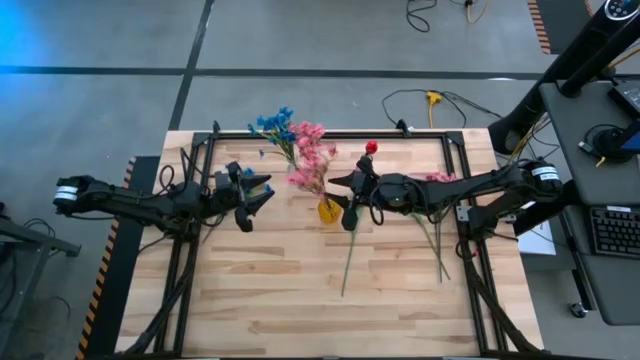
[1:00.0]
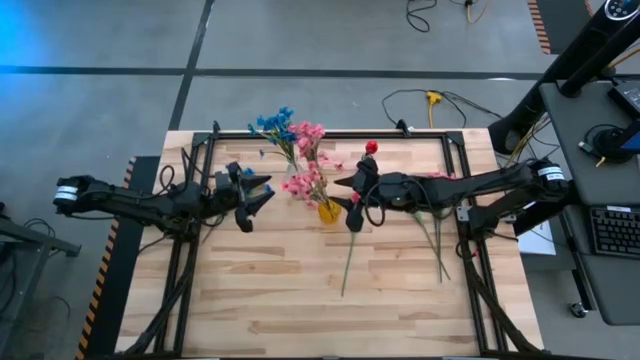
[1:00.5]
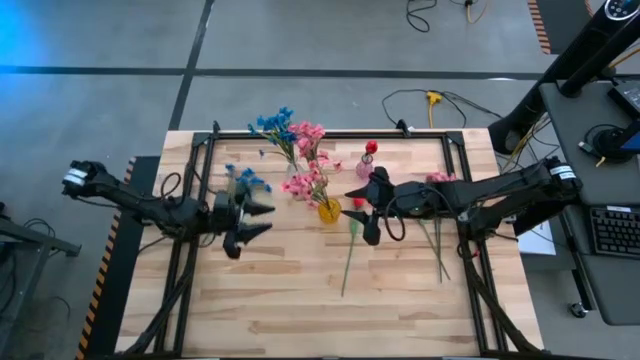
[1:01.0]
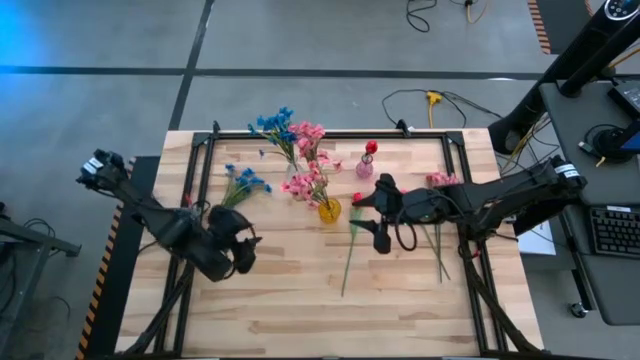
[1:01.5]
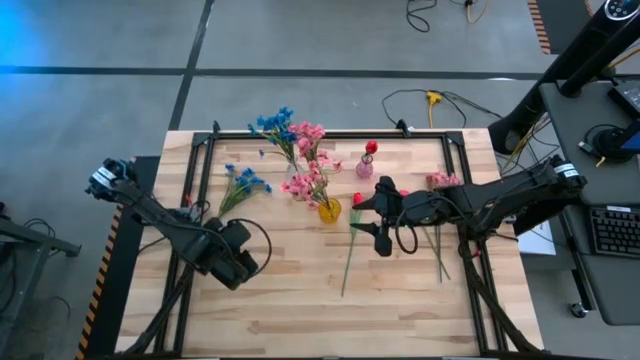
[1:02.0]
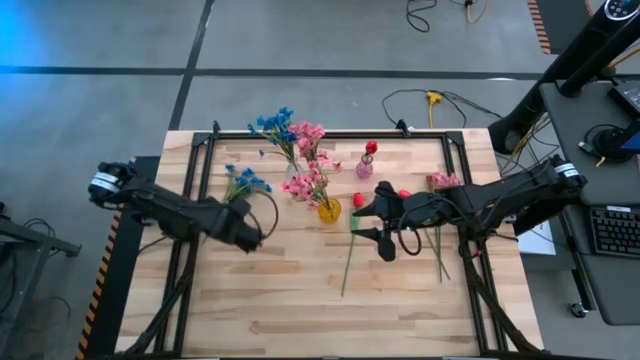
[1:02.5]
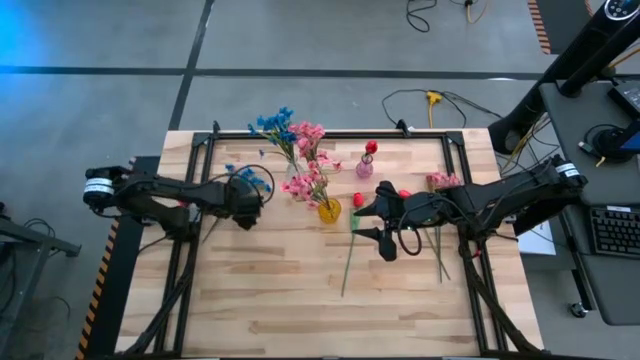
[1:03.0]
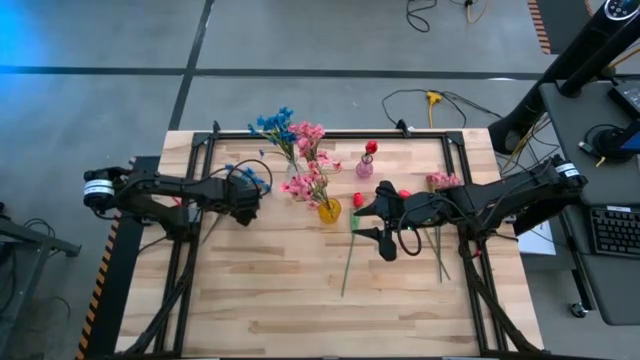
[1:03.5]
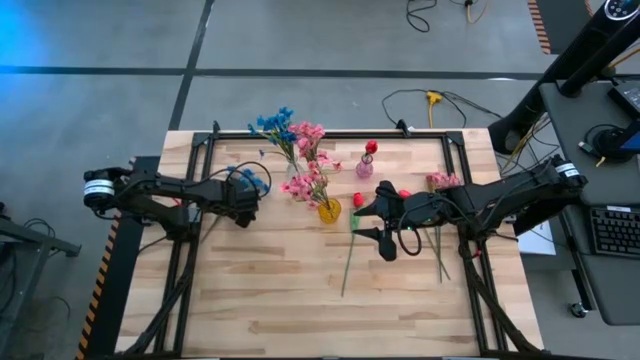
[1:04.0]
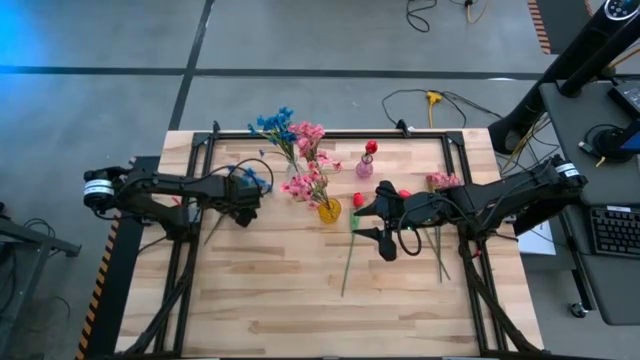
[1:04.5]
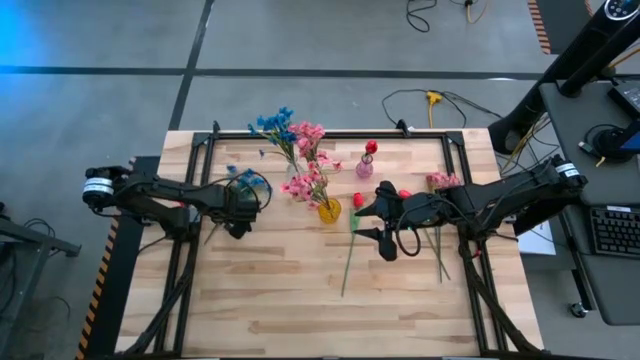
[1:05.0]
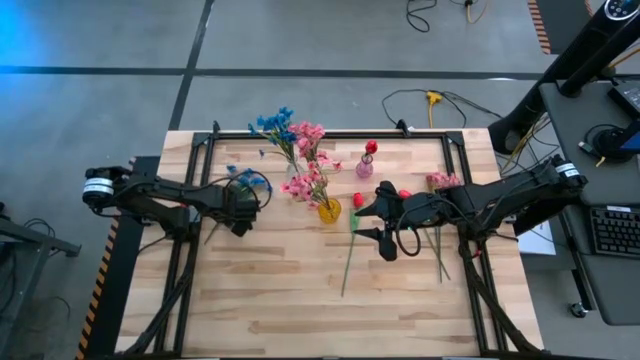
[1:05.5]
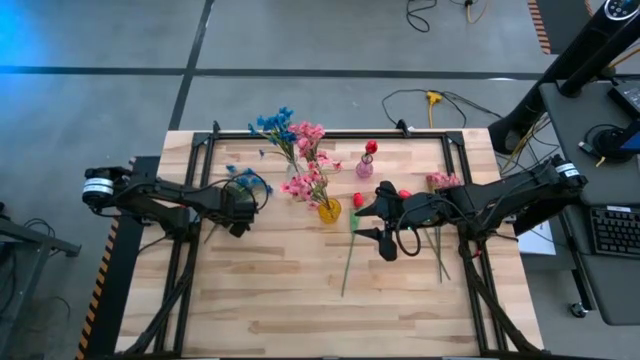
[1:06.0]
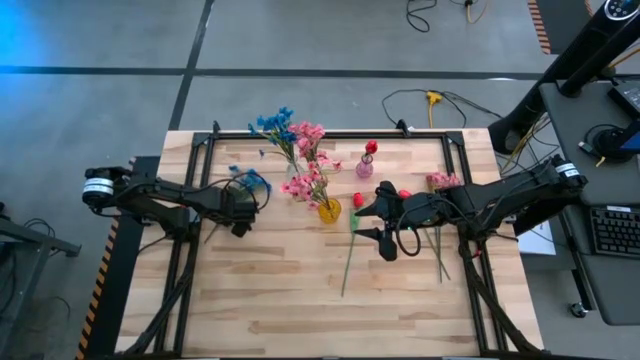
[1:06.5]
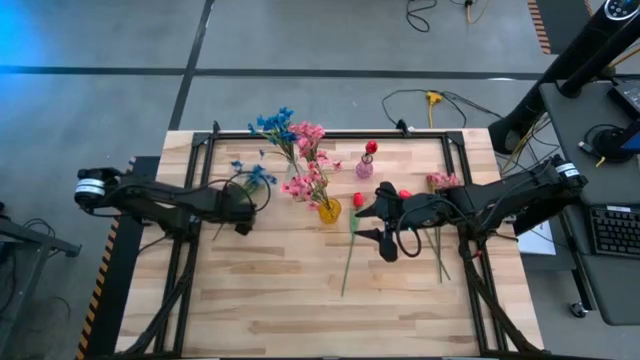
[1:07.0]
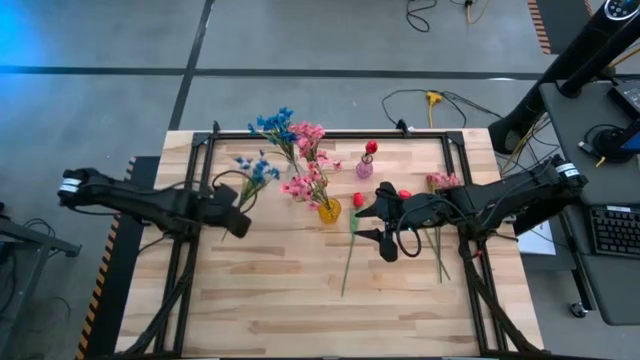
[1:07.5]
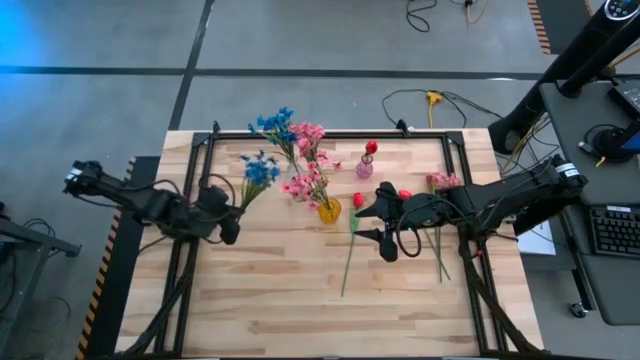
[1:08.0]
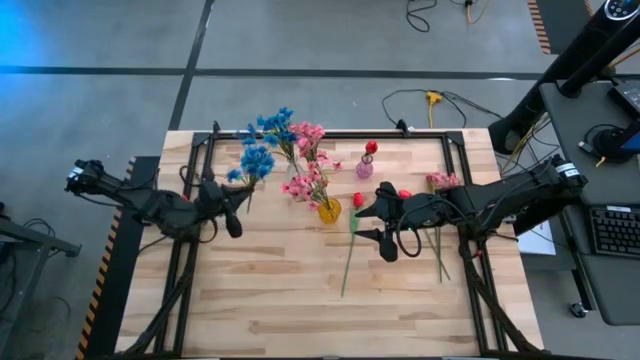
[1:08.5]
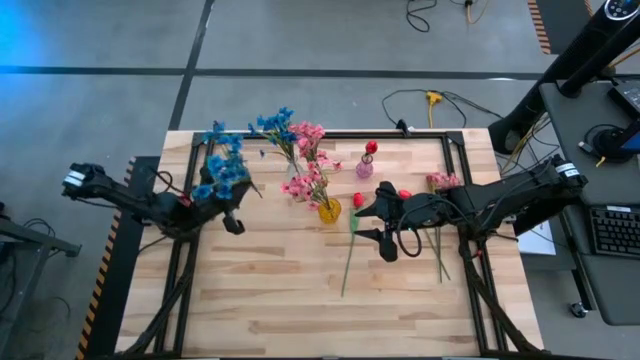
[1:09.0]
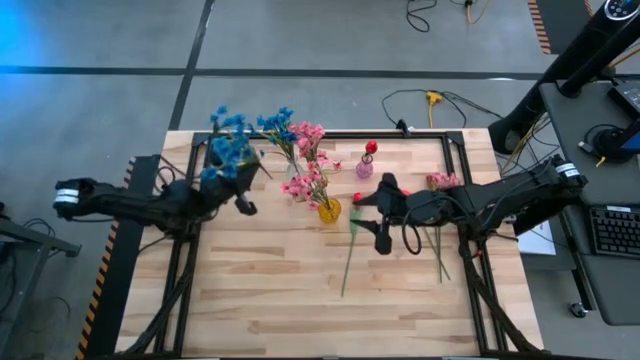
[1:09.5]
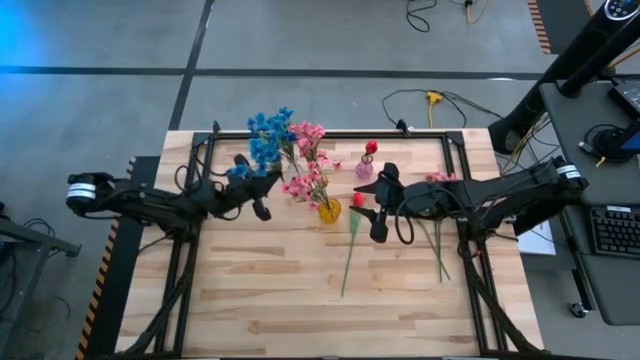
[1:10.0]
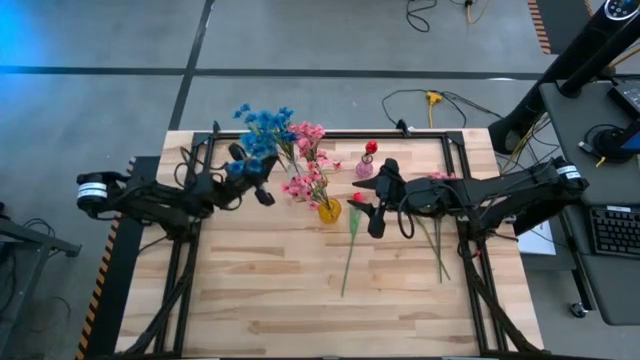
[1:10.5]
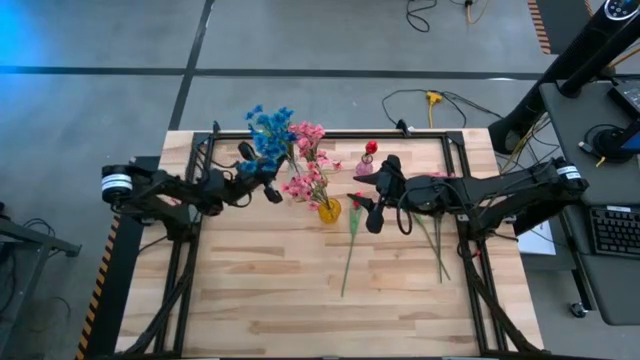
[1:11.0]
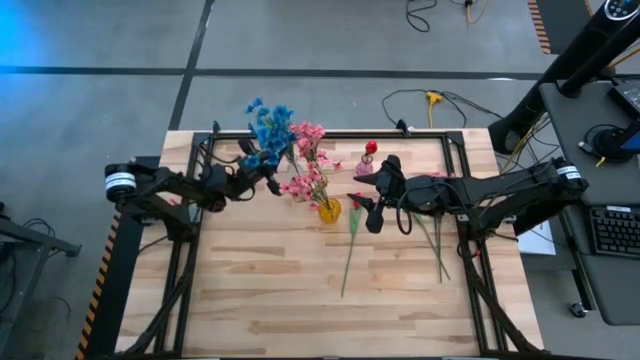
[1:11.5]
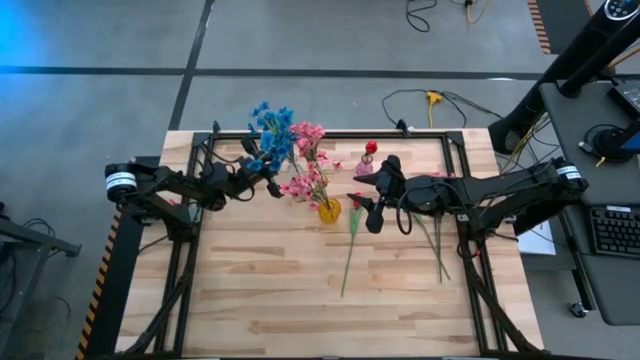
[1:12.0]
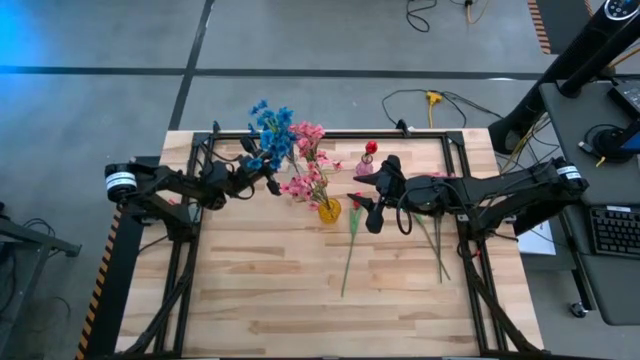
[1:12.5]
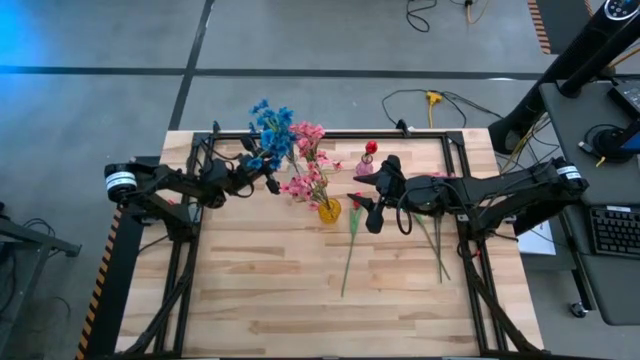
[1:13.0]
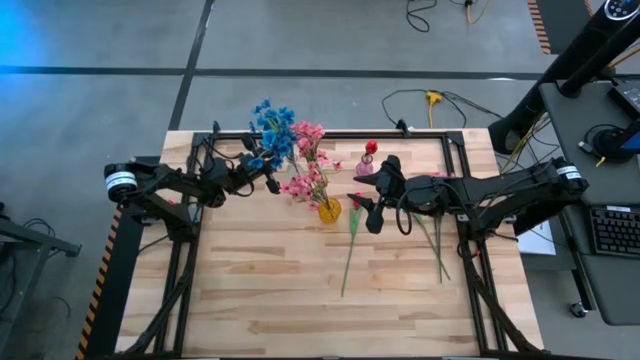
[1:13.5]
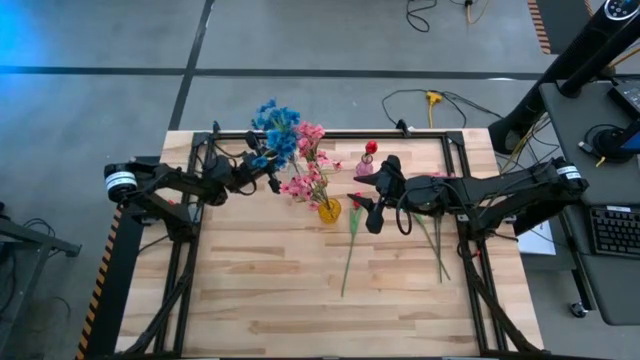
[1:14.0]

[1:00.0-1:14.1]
Task: Sort flowers into vase by color
Put the blue flowers into the transparent vase

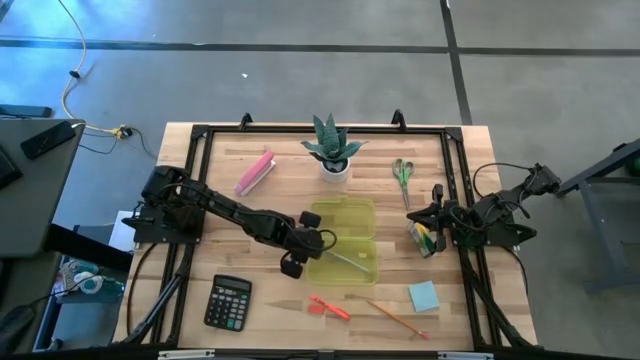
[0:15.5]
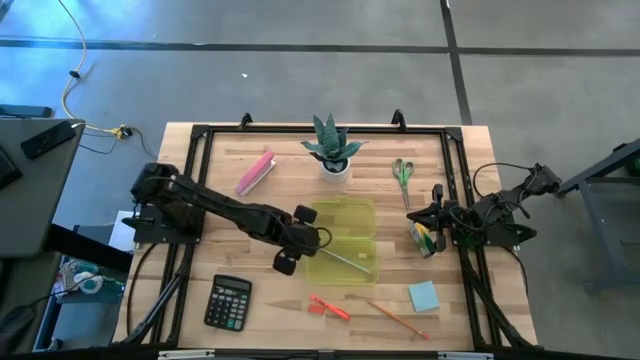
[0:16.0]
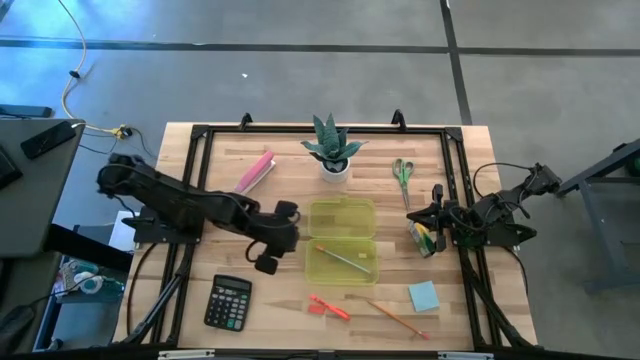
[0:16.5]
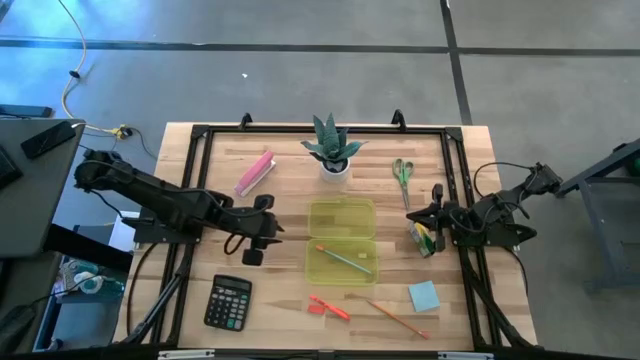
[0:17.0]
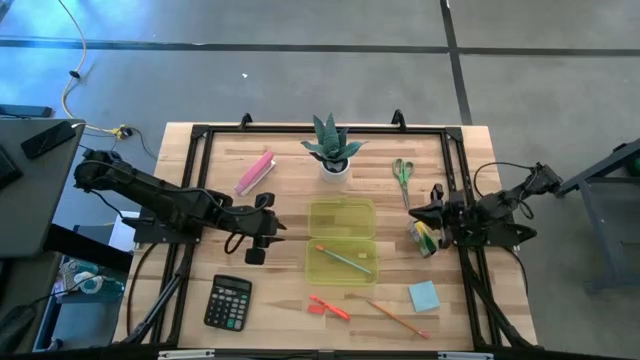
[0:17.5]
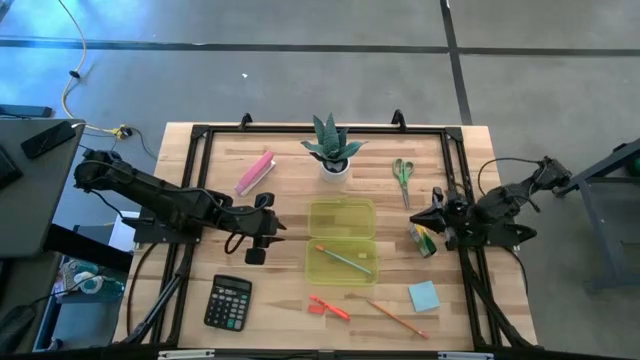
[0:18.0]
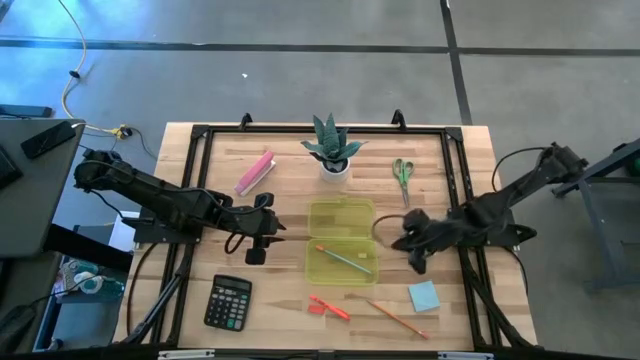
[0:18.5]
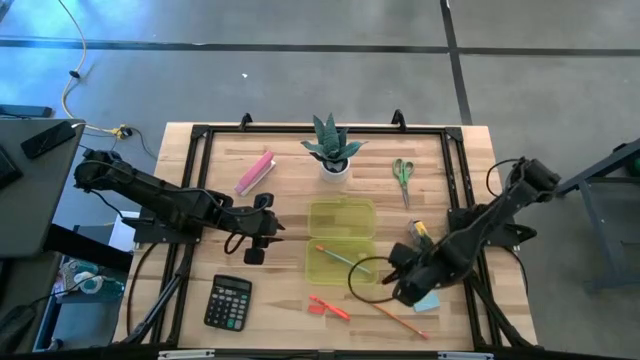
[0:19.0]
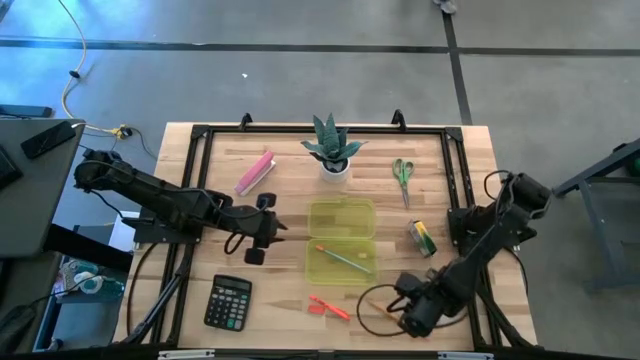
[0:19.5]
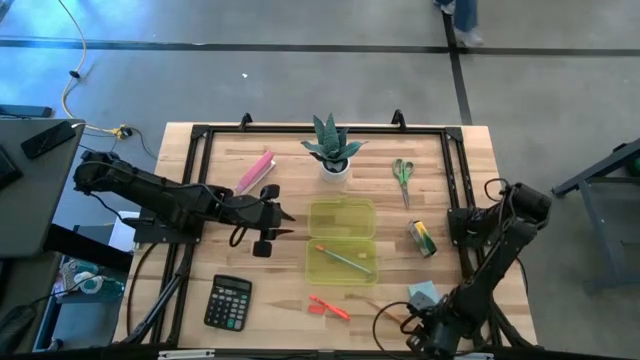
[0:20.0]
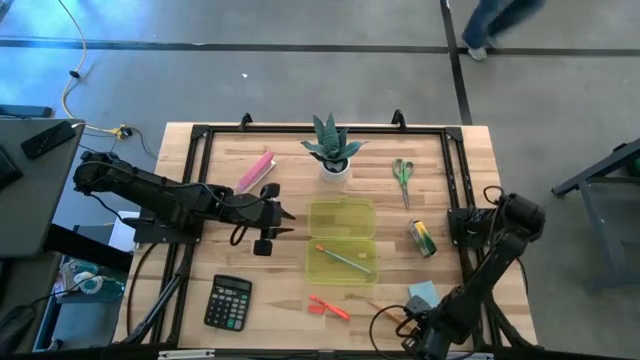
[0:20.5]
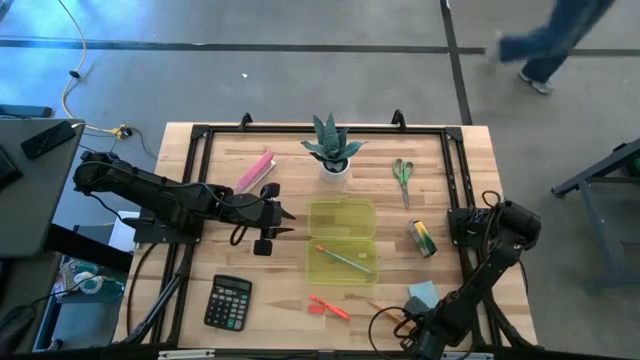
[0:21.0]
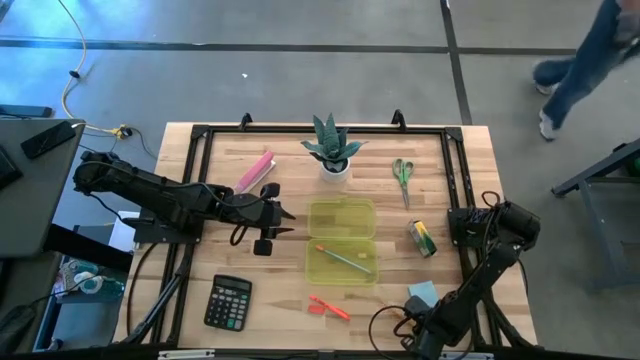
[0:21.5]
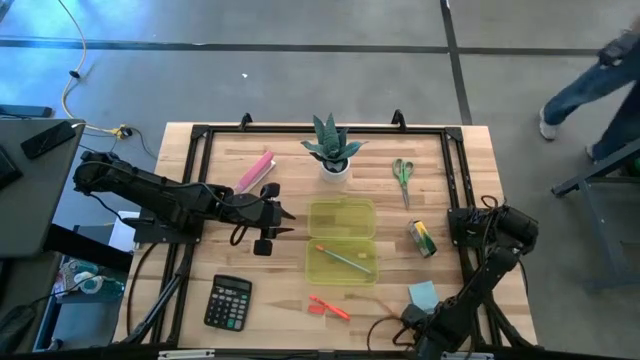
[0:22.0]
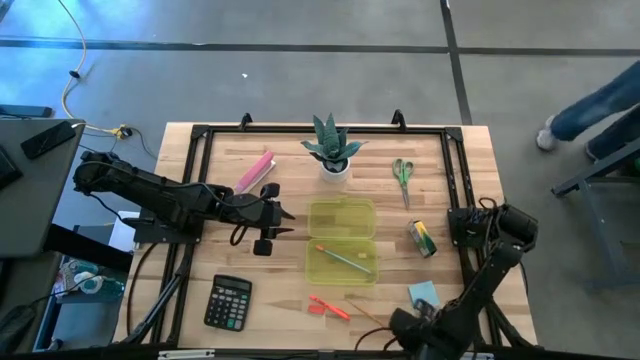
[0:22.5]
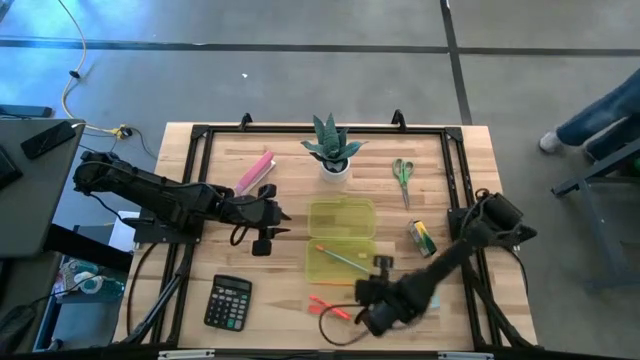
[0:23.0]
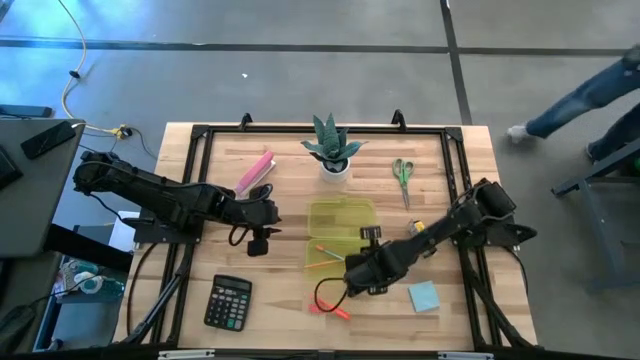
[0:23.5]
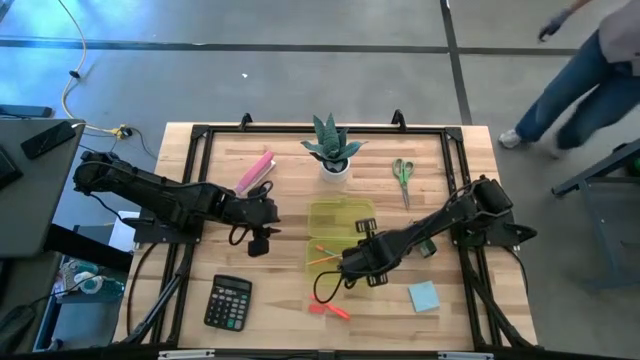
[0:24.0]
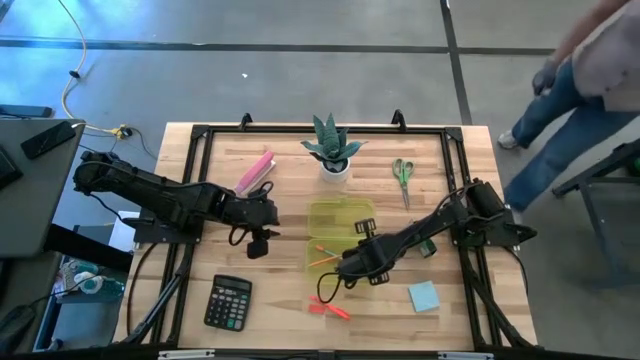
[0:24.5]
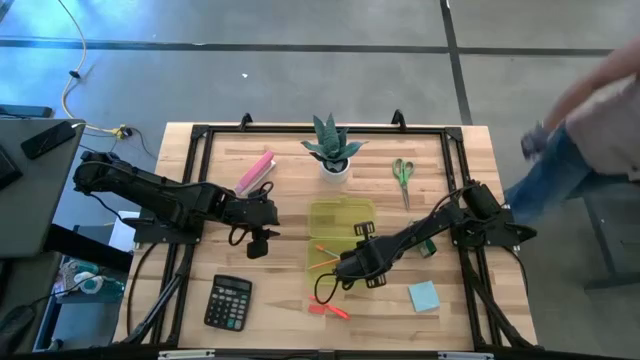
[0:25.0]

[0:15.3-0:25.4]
Task: Pack school essentials
Put the yellow pencil into the supply box
